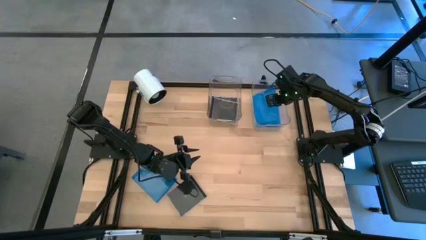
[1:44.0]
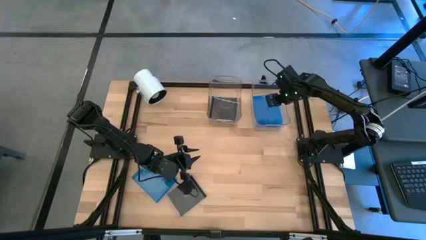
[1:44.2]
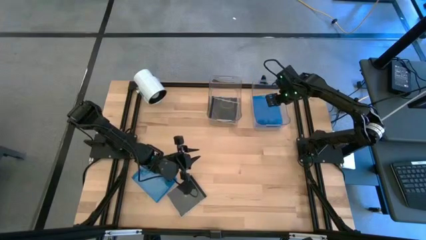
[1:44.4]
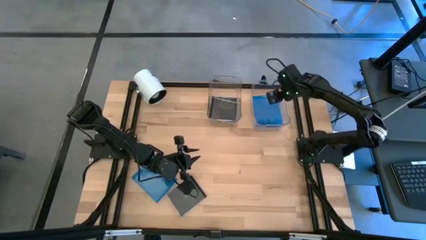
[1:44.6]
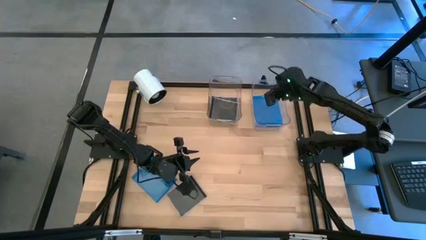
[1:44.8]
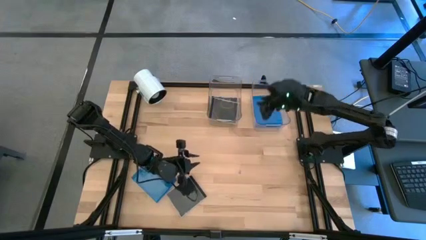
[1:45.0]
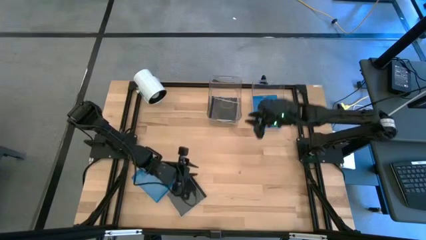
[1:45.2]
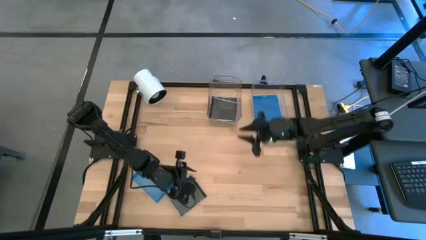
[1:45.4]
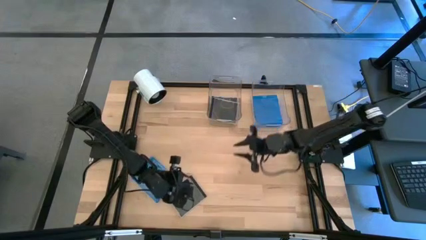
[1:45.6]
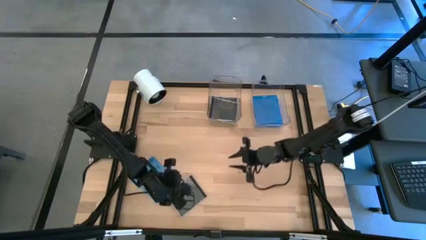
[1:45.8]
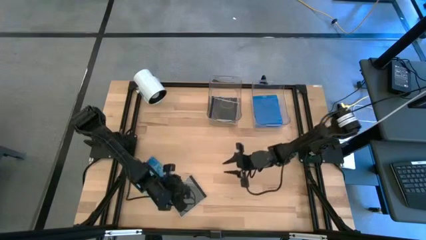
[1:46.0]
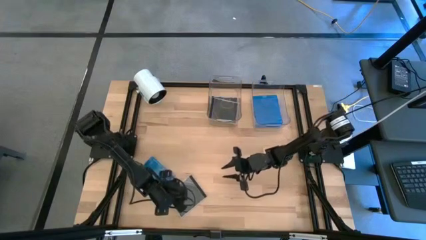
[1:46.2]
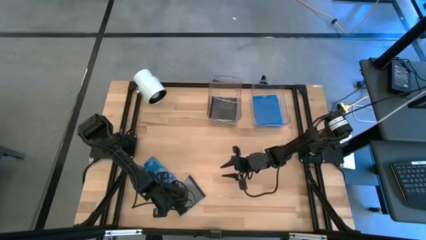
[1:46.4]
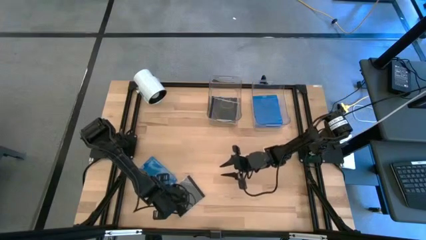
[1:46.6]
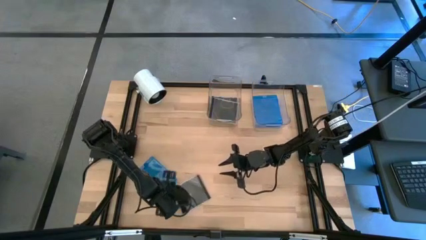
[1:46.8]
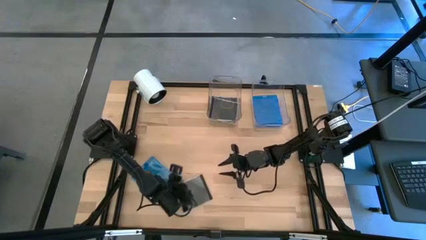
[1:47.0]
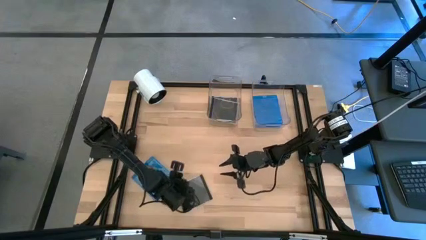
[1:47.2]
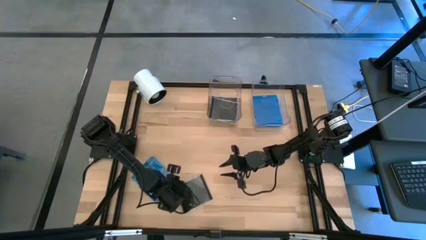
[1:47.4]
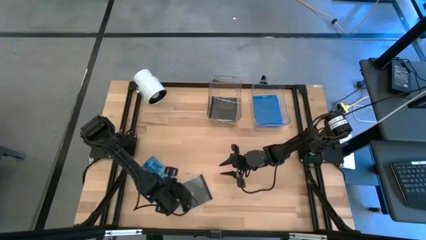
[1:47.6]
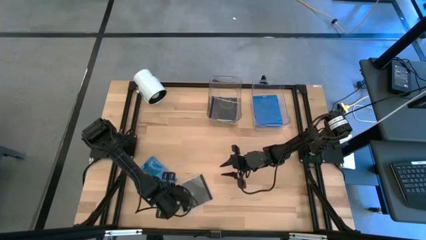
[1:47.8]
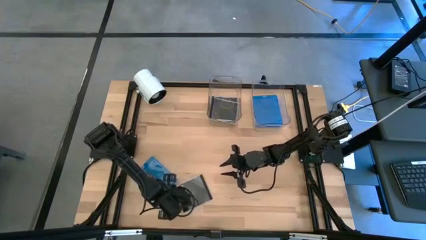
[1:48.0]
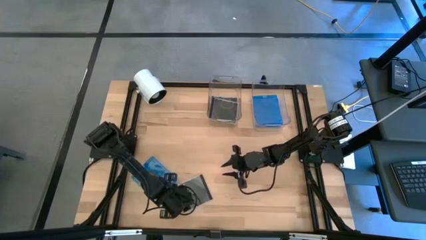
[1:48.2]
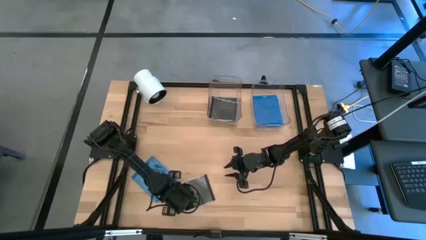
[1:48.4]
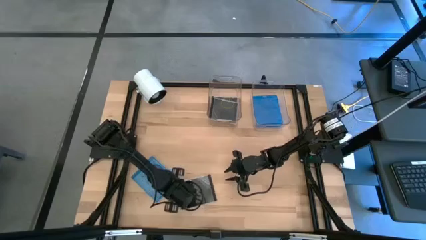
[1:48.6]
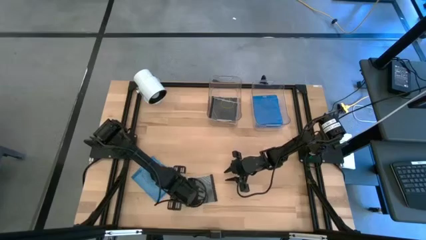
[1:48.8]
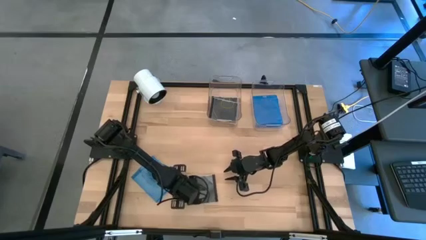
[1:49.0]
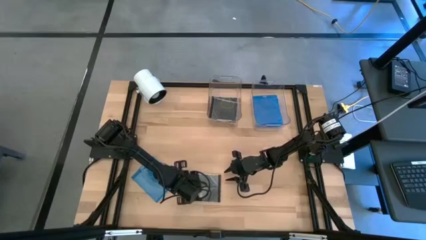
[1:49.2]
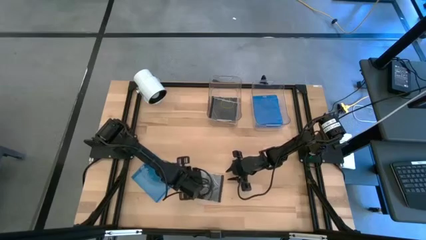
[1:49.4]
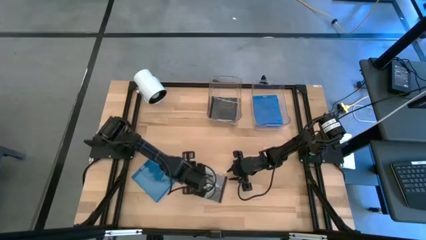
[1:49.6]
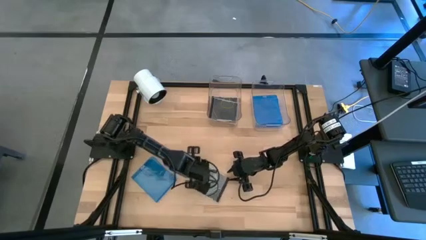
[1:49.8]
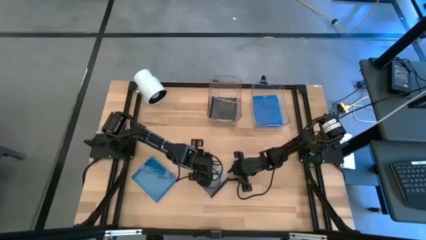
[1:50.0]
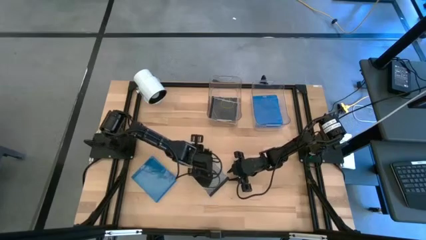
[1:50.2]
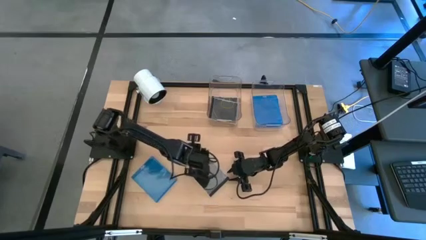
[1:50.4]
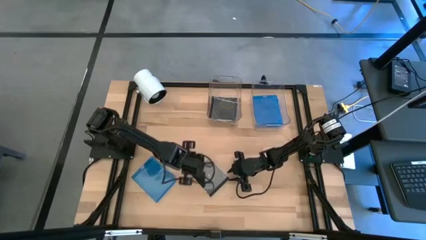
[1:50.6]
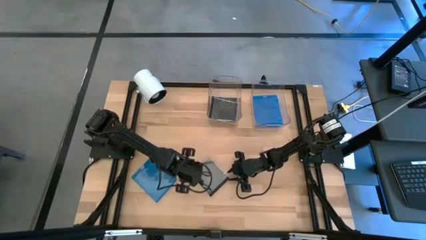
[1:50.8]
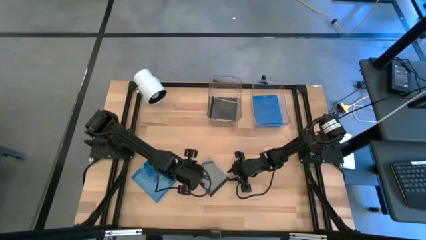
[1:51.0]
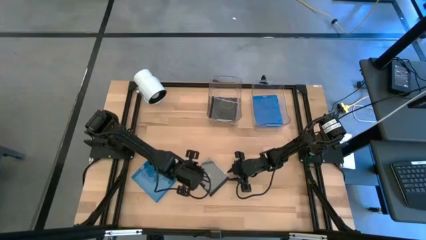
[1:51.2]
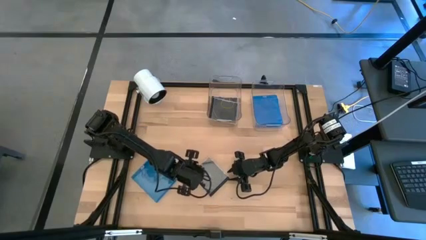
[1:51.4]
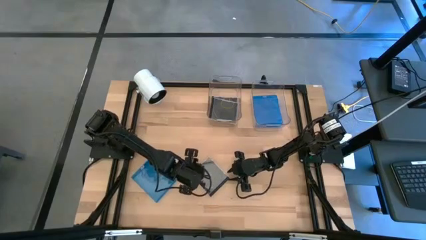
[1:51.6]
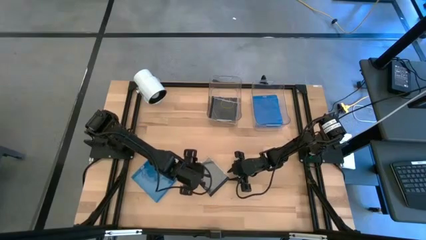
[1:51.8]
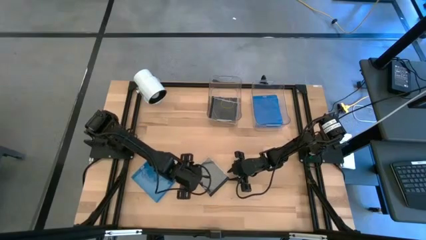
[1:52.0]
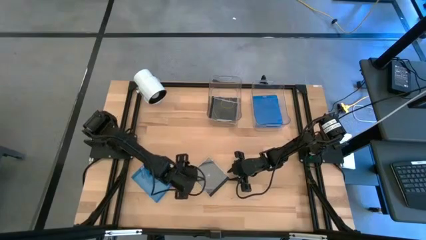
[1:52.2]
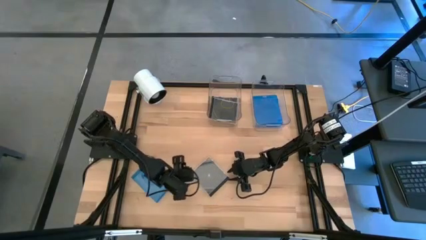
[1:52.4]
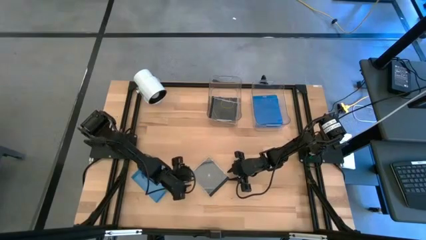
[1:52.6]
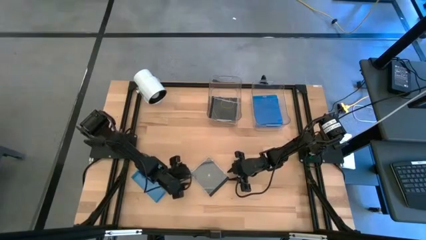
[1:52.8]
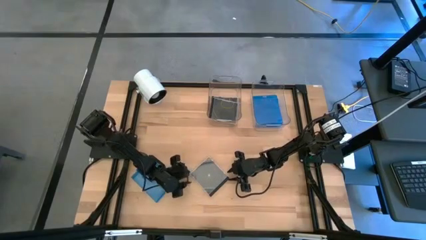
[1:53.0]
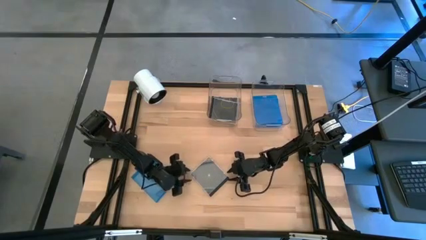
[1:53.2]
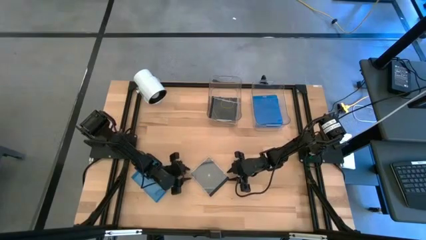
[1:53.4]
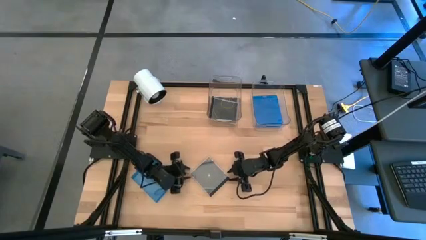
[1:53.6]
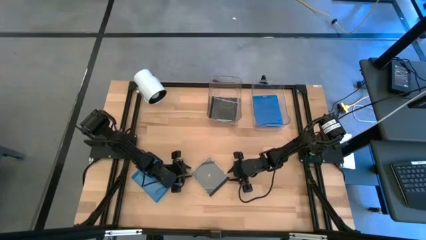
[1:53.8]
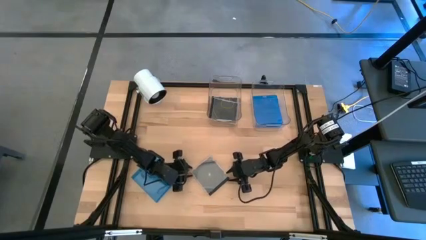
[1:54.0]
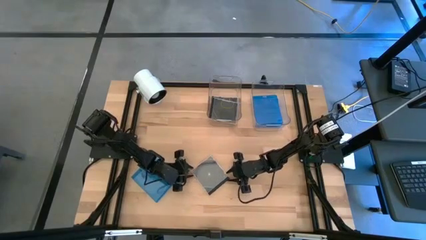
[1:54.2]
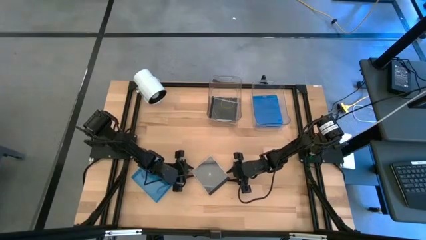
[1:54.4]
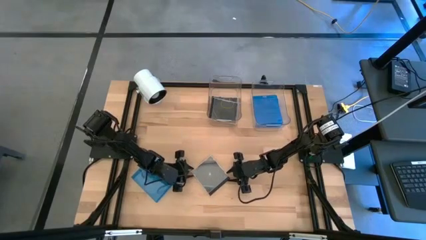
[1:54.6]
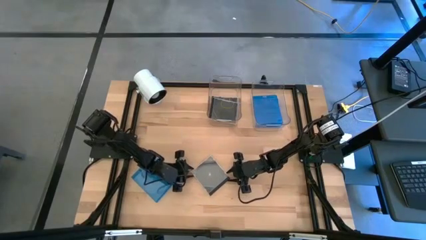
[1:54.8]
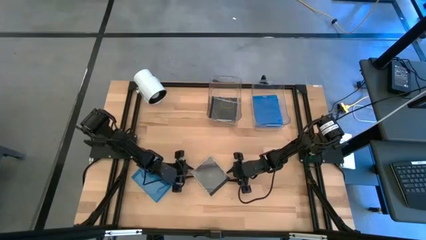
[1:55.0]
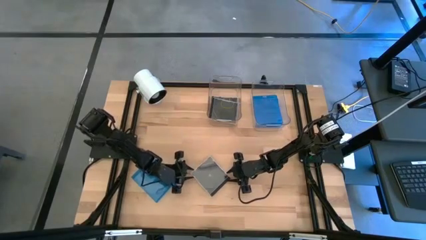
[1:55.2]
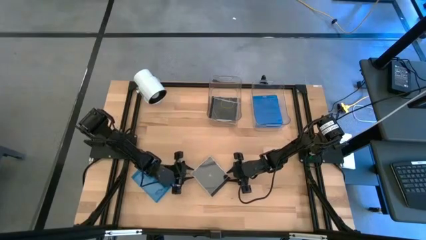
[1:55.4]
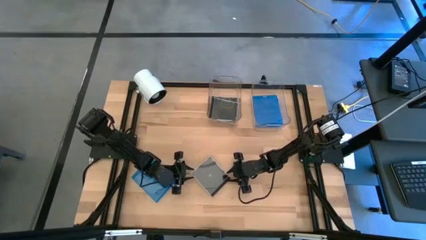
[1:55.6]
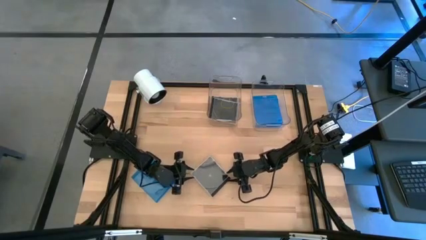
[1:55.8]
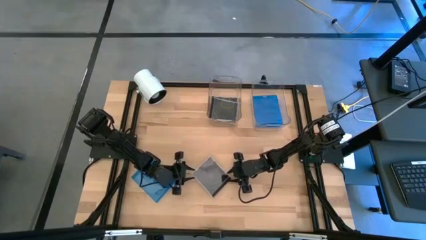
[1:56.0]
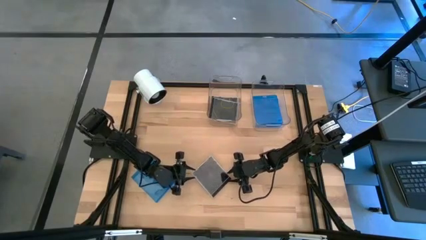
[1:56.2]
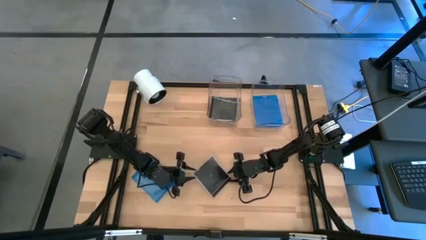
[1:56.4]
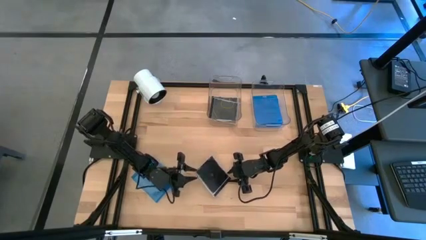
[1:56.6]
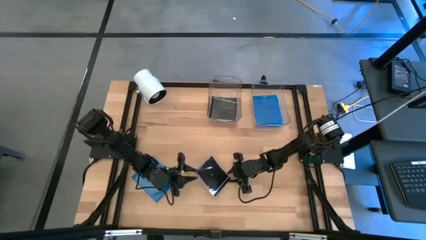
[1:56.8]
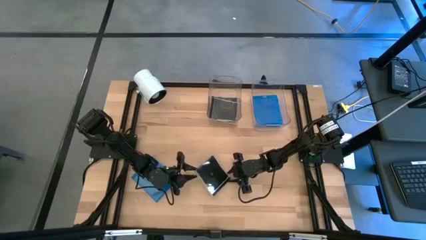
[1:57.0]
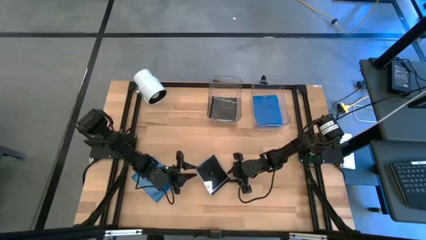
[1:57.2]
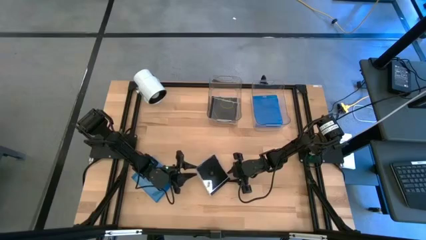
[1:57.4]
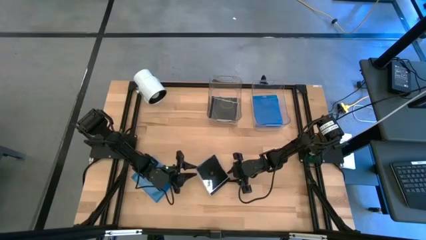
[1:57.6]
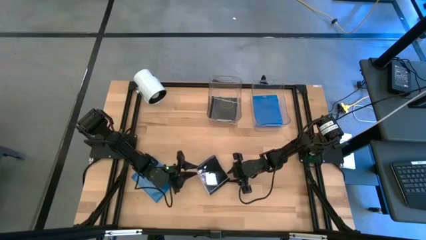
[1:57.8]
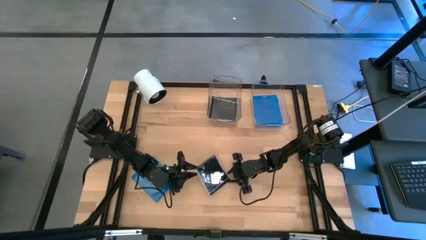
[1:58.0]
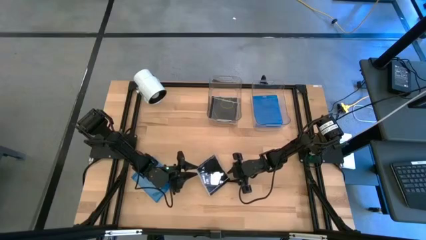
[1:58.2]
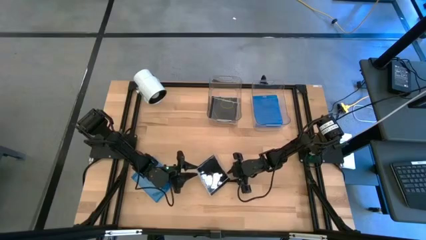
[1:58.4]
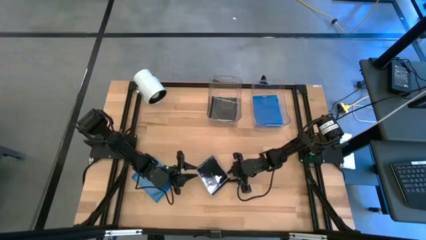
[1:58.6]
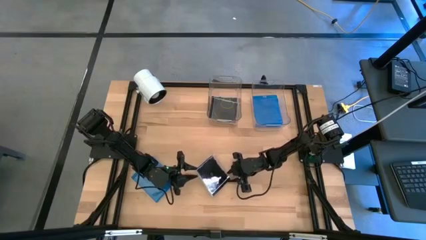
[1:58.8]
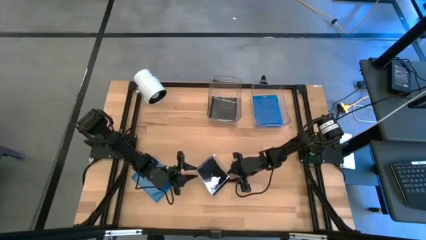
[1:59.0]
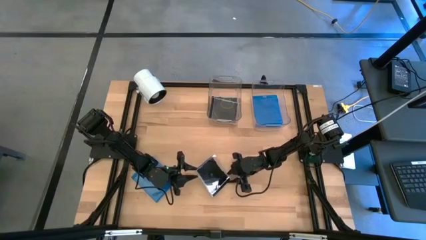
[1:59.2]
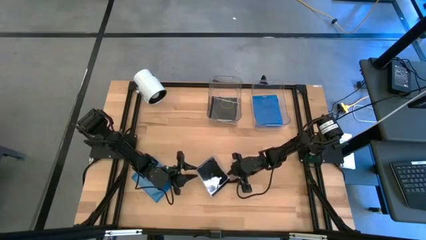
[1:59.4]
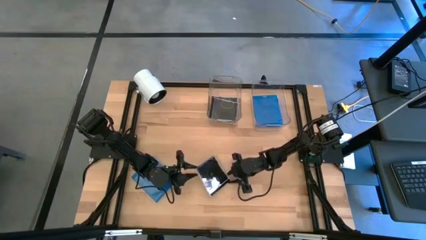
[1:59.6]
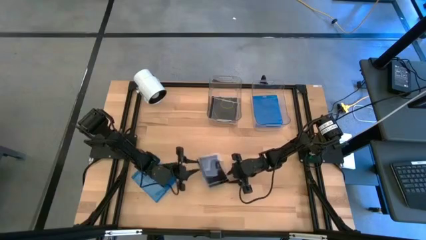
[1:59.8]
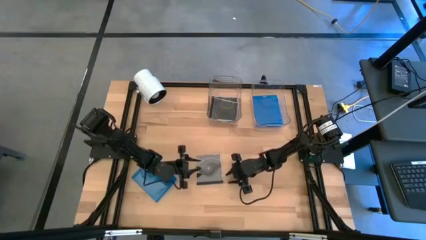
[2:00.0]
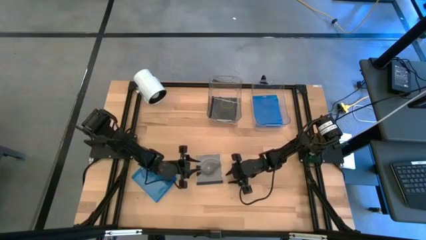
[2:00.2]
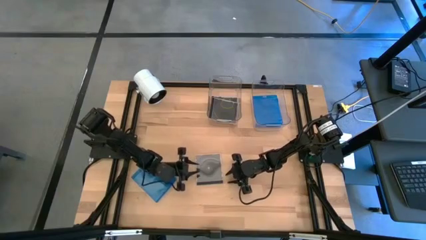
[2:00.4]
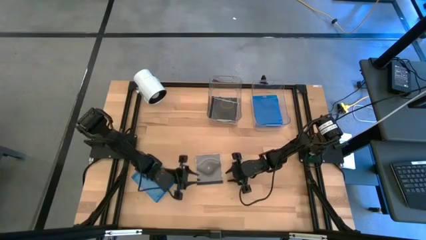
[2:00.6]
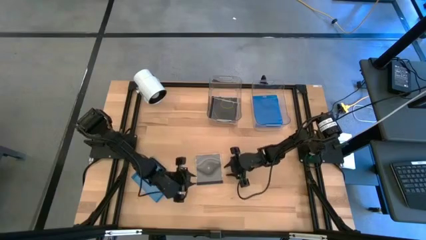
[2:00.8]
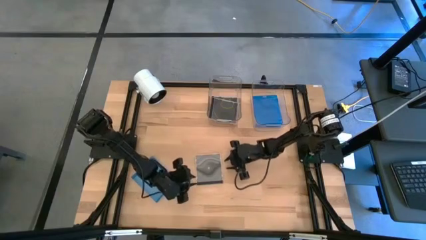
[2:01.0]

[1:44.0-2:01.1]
Task: Pick & place jewel cases by type
Put the black CD case into the left transparent bin
